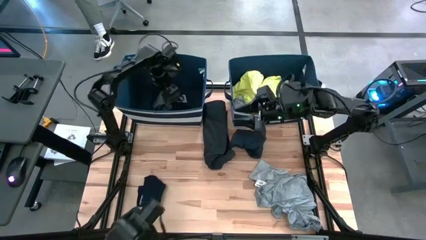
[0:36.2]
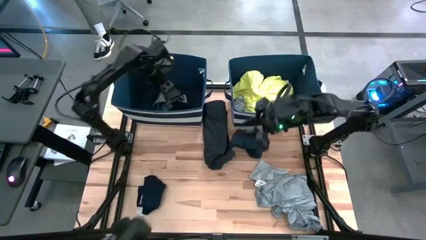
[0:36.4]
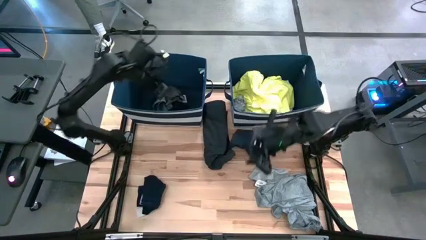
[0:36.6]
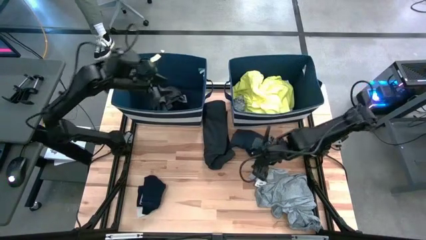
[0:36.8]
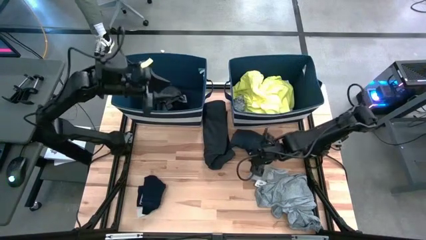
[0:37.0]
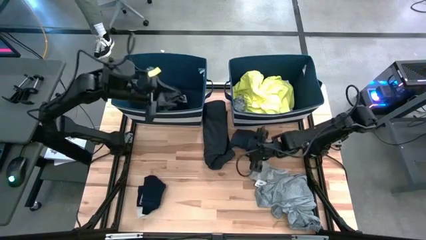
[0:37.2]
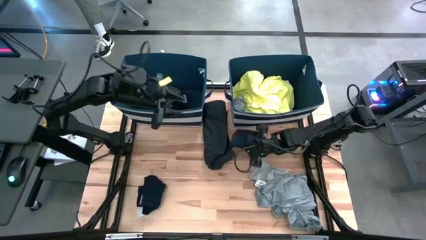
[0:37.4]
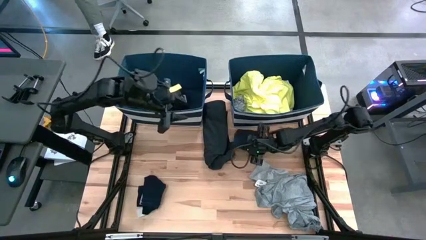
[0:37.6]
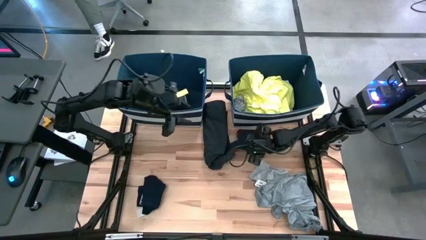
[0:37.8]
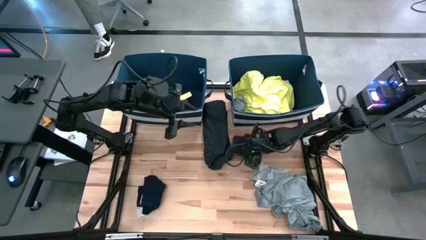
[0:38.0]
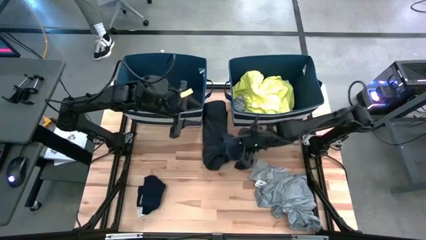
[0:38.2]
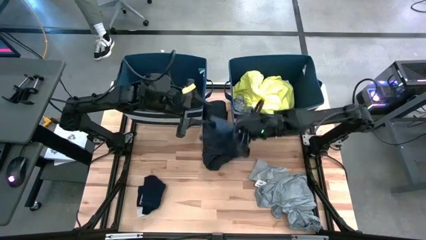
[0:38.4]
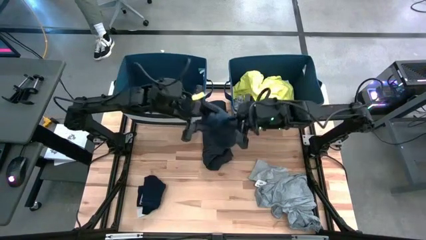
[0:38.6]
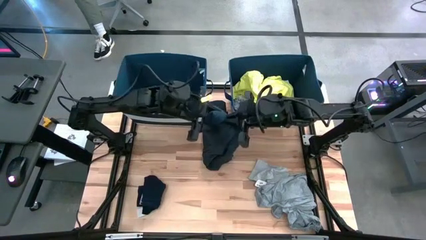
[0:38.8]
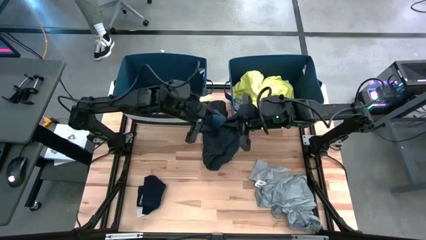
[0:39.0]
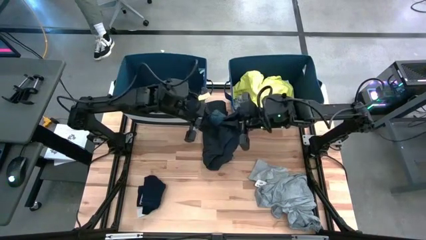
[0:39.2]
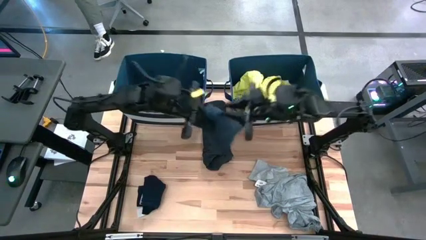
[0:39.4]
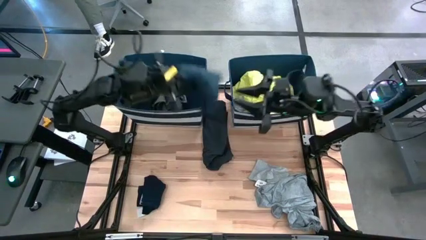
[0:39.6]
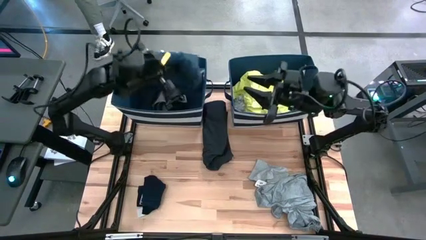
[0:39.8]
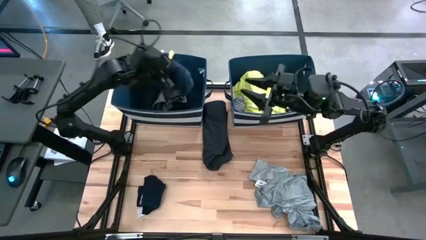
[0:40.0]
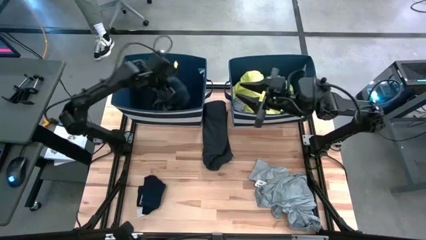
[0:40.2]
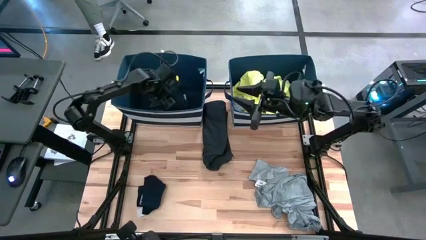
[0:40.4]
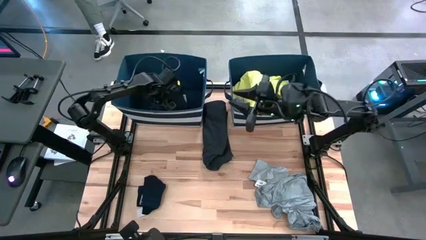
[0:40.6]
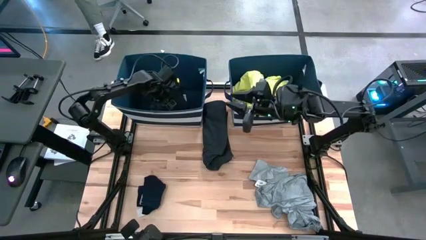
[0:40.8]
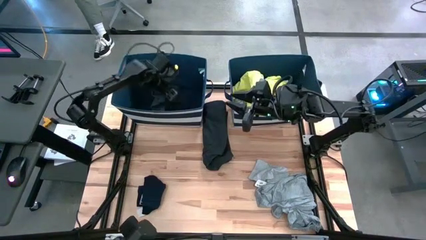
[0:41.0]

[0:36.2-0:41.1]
Task: Sort clothes
Put the blue shirt into the left blue laundry bin

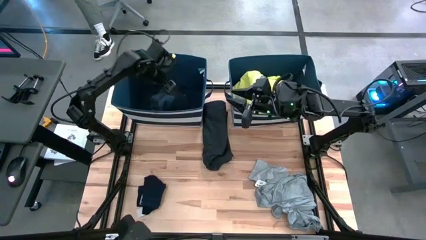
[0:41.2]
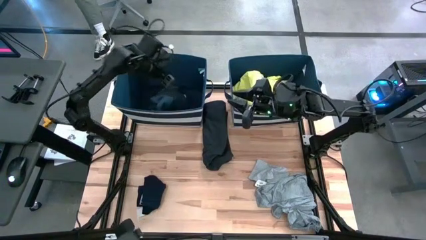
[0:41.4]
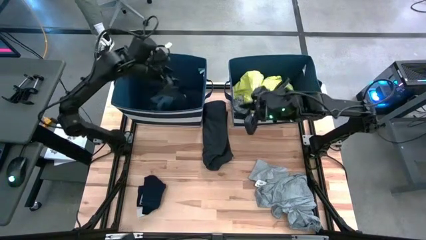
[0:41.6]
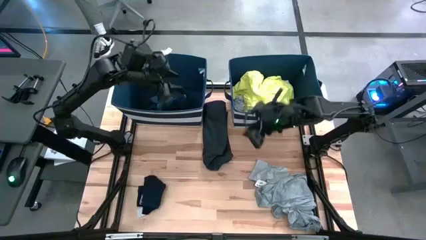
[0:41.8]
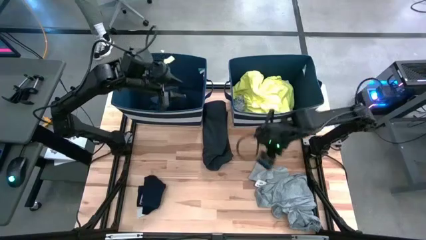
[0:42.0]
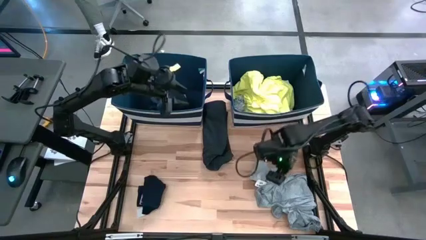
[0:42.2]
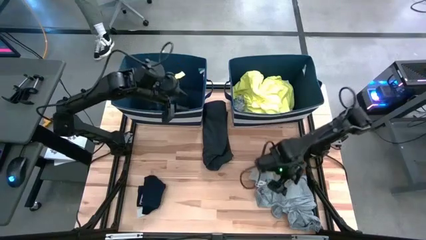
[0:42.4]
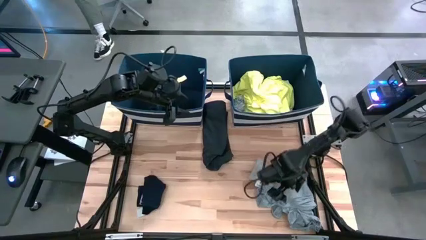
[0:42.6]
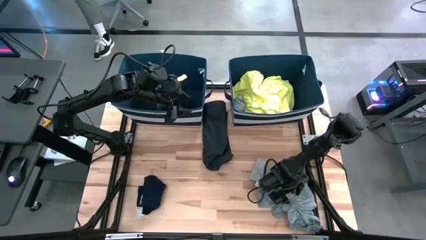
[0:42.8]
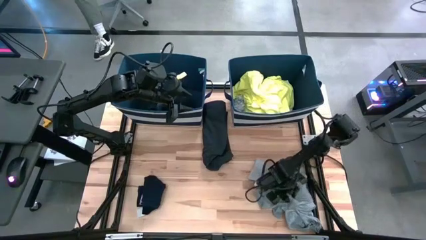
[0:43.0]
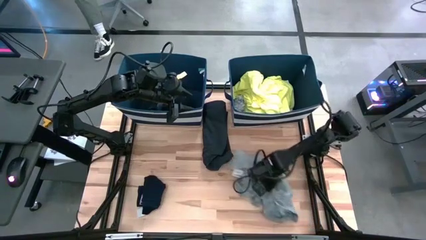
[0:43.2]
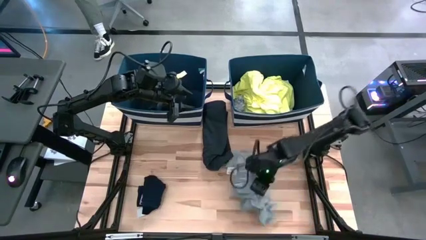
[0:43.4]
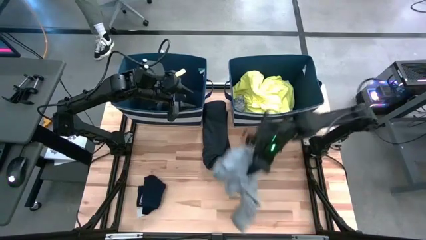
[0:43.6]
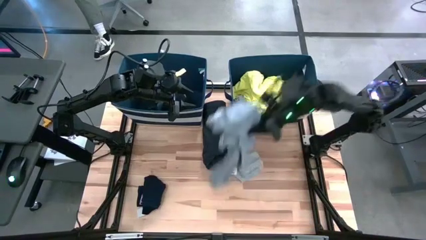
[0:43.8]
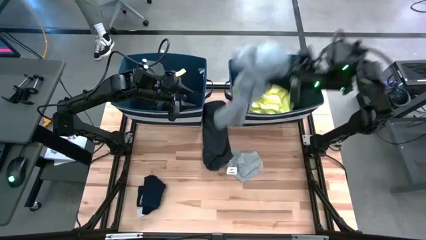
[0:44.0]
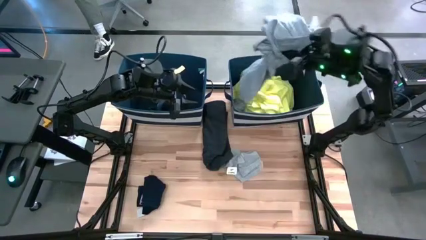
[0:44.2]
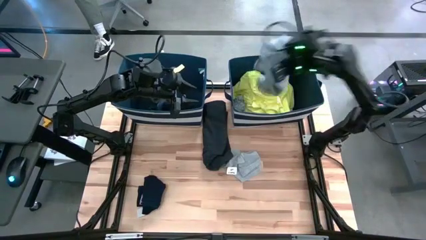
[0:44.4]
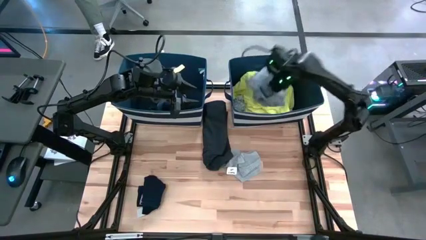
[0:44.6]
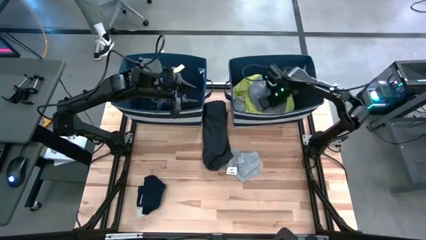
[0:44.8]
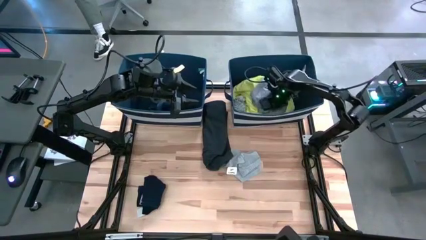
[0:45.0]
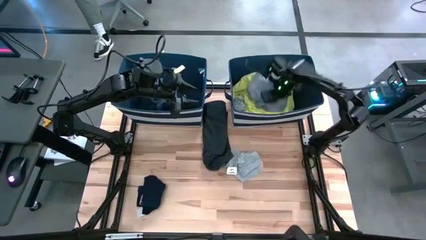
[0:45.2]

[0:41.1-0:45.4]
Put the gray shirt into the right blue laundry bin

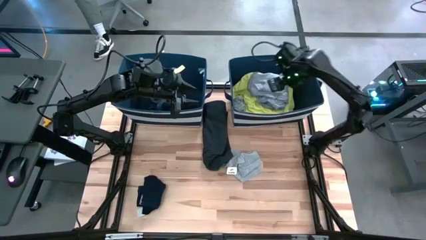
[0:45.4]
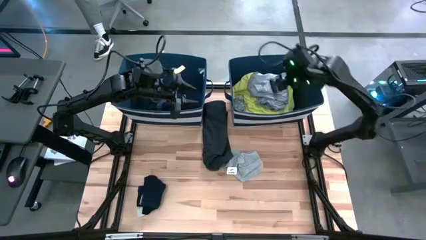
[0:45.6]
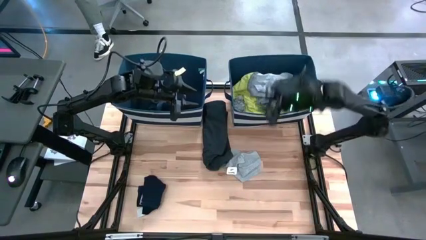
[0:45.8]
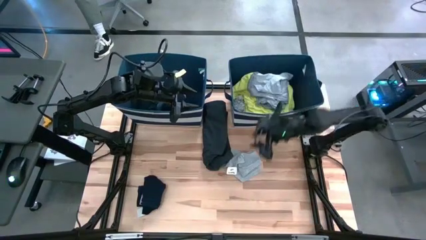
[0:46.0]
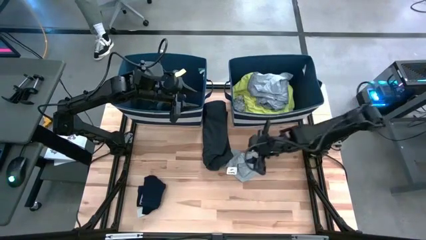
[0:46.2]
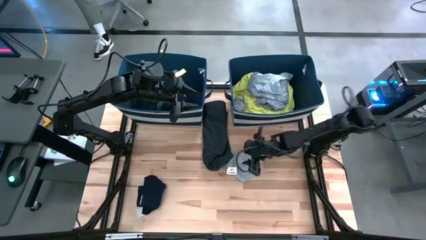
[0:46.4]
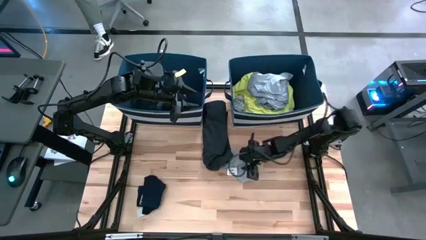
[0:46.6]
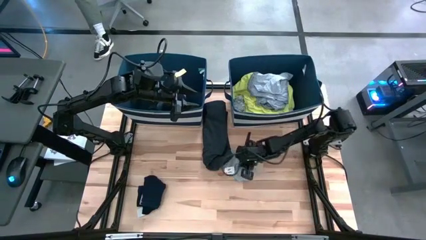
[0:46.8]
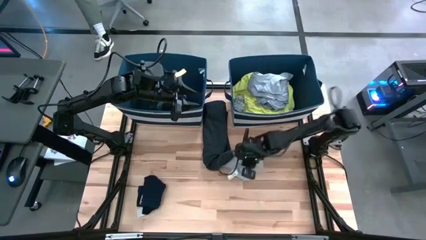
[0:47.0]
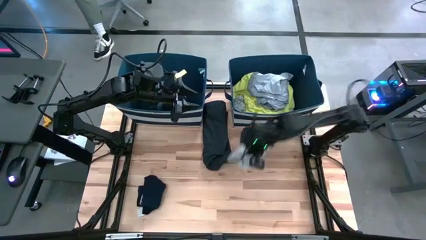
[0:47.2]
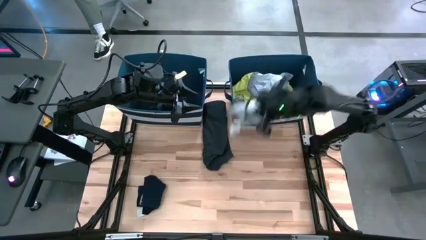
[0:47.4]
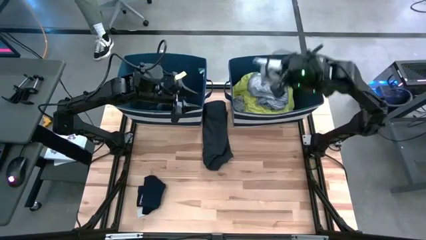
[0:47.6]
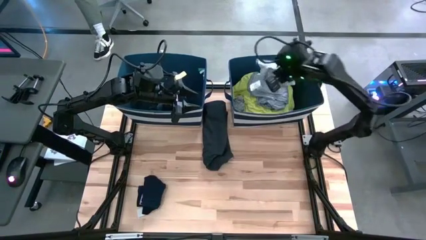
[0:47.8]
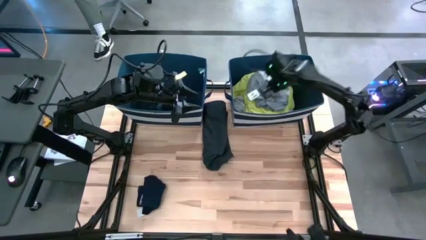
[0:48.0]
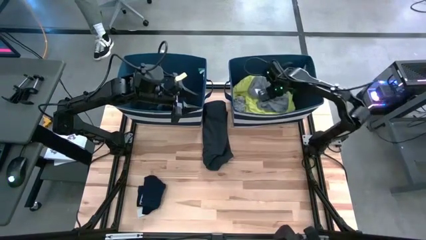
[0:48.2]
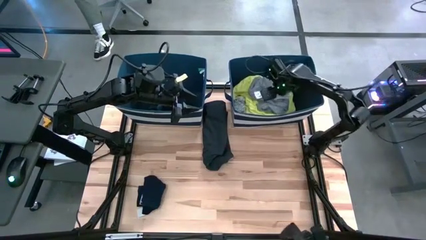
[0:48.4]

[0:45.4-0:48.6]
Put the gray shorts into the right blue laundry bin

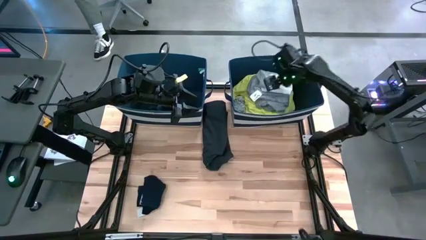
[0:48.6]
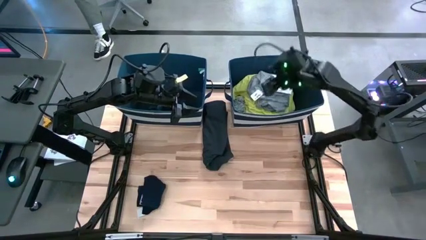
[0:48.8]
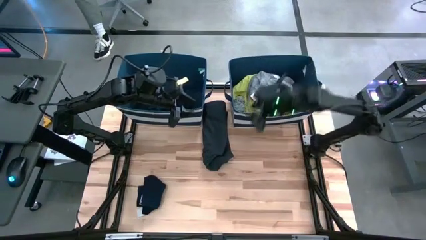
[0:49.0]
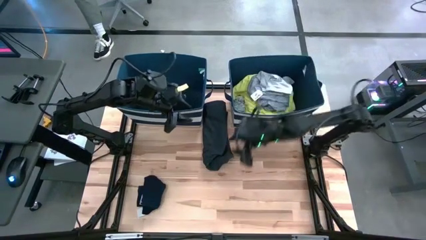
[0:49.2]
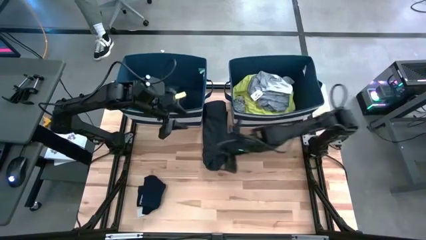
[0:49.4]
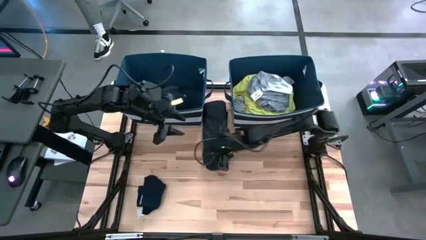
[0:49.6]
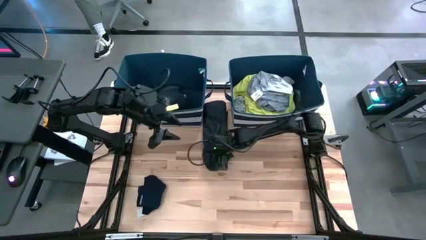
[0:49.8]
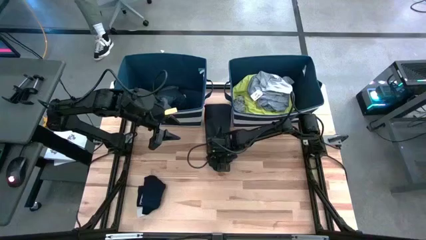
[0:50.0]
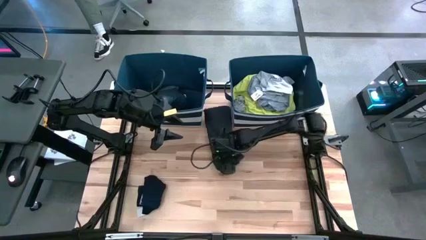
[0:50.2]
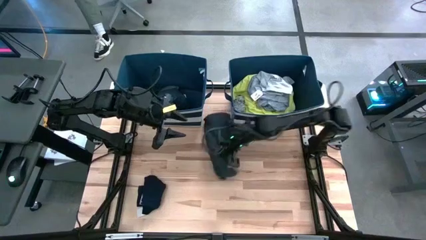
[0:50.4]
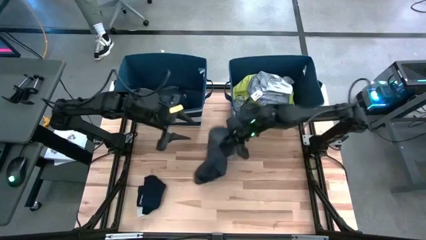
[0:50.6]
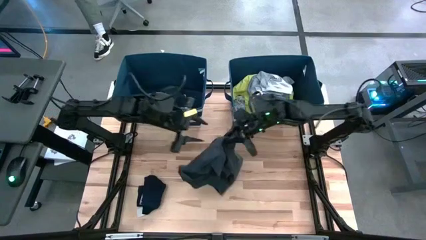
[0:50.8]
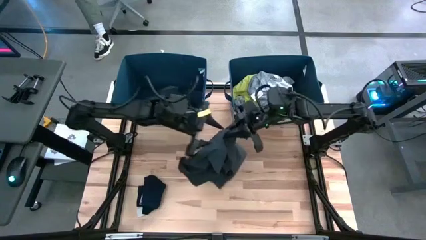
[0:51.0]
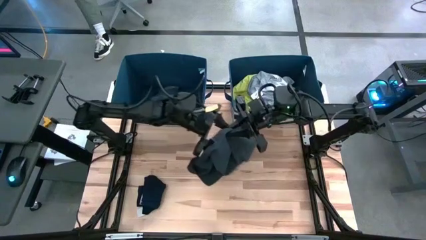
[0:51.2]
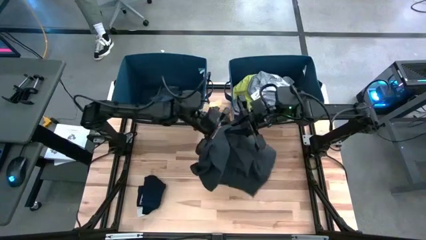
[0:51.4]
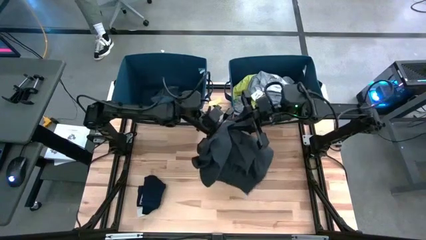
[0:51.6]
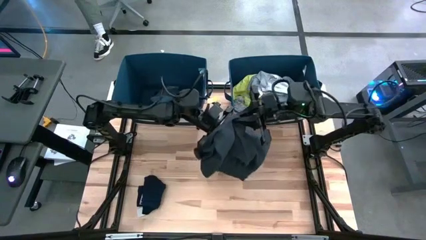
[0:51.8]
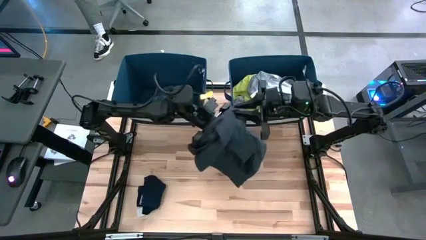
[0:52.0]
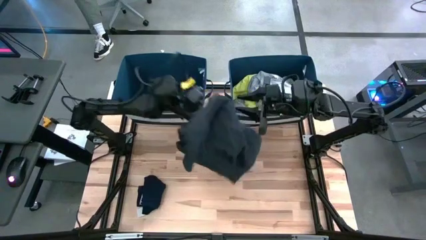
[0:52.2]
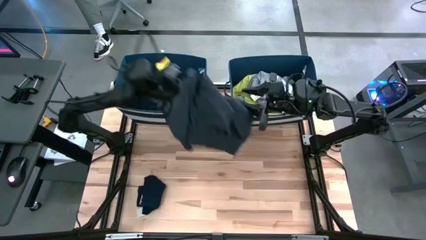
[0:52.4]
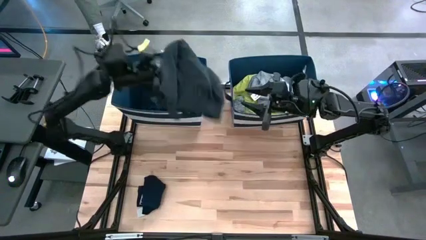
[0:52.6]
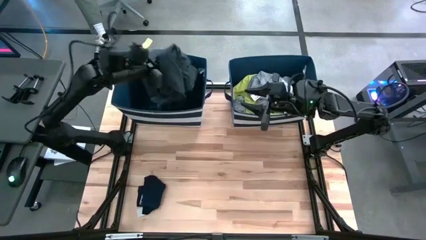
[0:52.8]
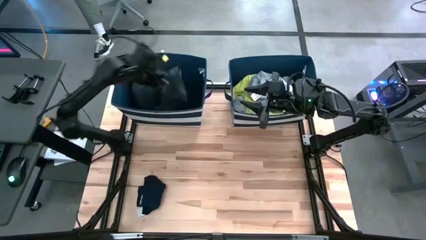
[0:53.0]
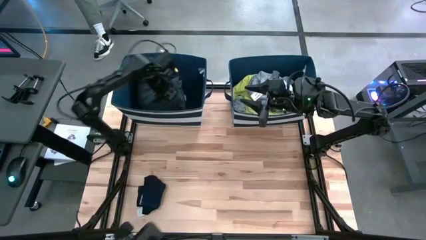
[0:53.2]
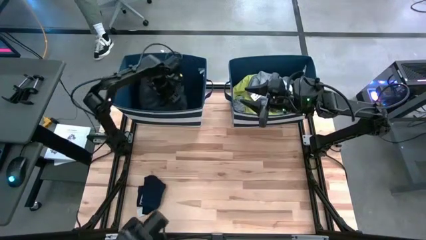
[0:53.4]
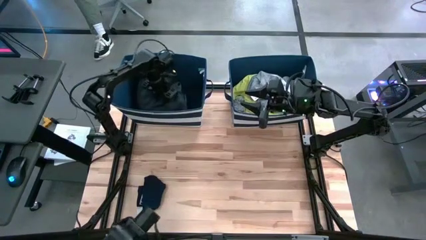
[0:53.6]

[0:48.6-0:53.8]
Put the black shorts into the left blue laundry bin
